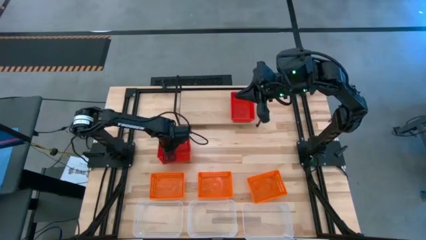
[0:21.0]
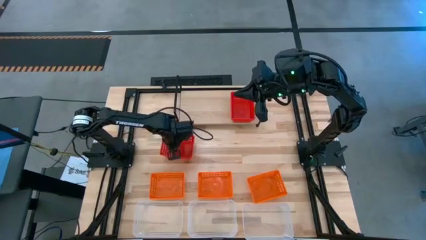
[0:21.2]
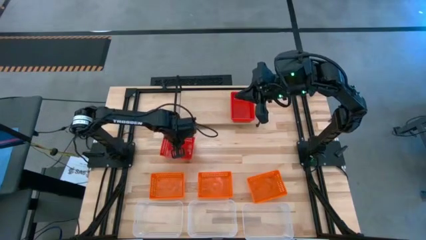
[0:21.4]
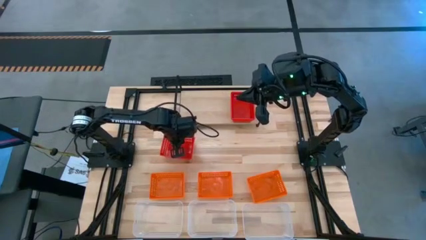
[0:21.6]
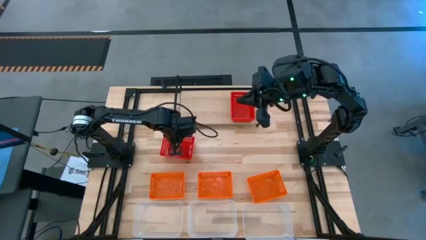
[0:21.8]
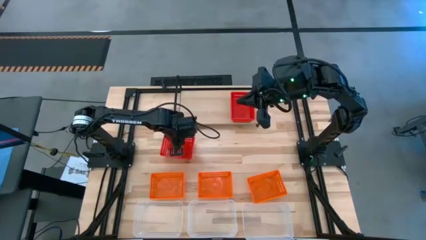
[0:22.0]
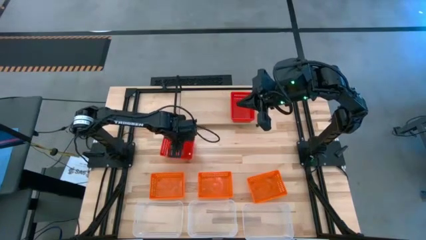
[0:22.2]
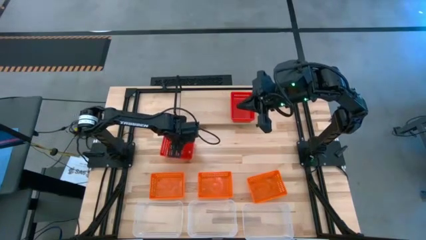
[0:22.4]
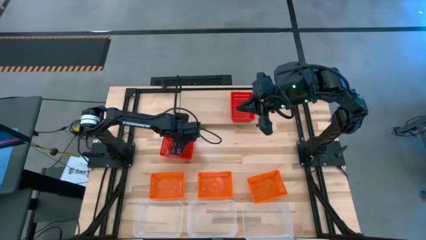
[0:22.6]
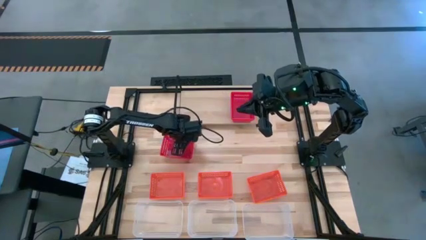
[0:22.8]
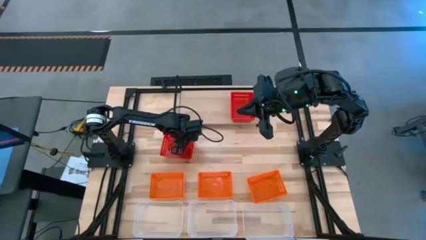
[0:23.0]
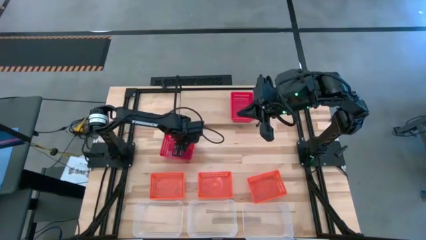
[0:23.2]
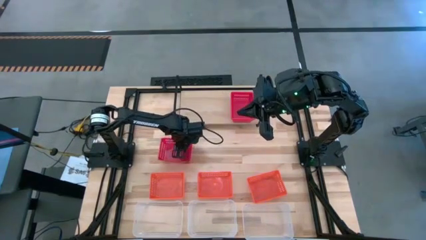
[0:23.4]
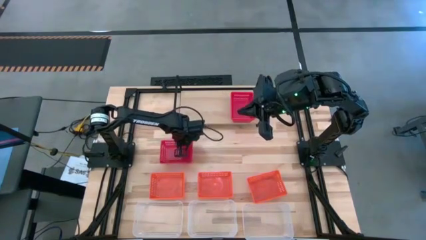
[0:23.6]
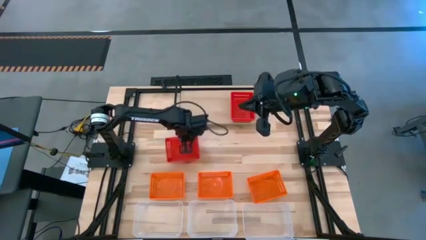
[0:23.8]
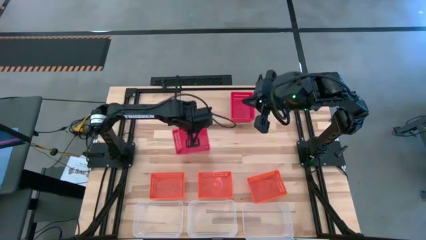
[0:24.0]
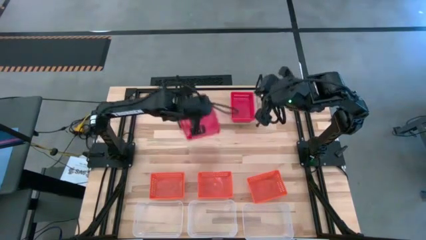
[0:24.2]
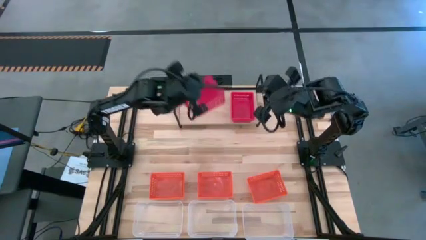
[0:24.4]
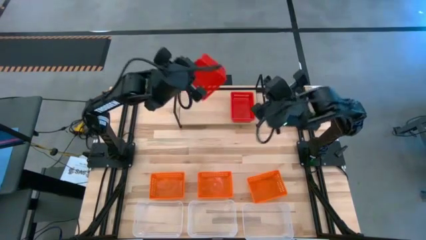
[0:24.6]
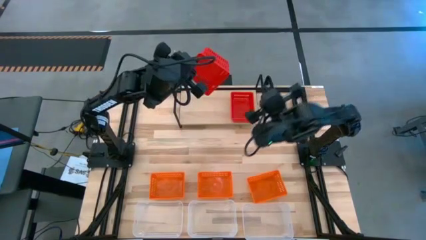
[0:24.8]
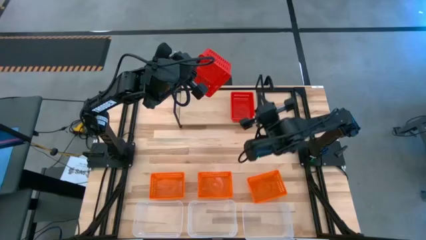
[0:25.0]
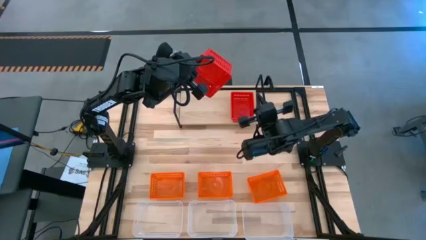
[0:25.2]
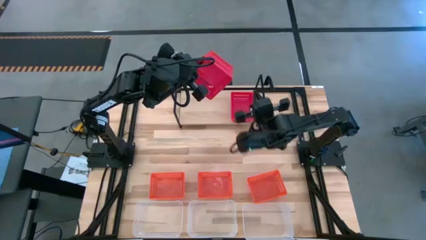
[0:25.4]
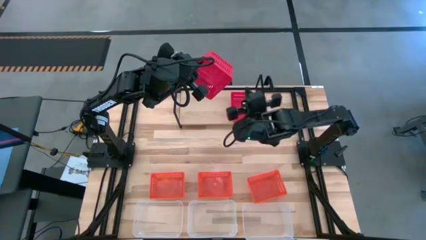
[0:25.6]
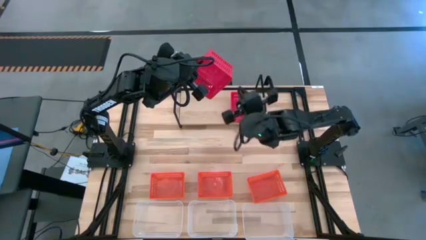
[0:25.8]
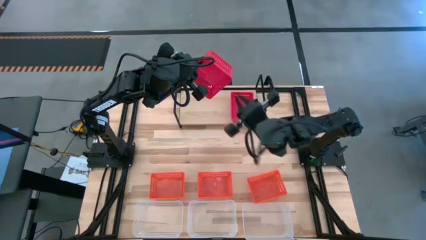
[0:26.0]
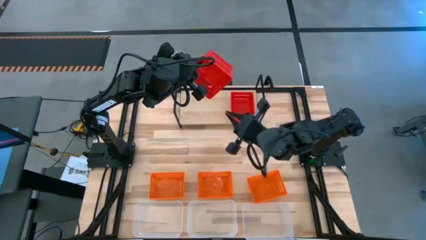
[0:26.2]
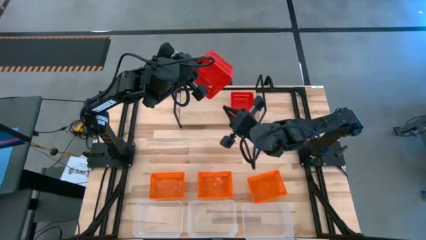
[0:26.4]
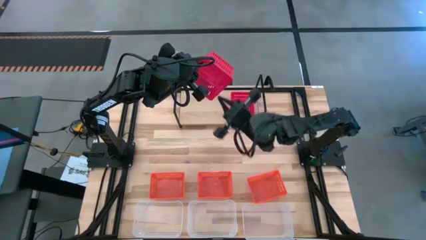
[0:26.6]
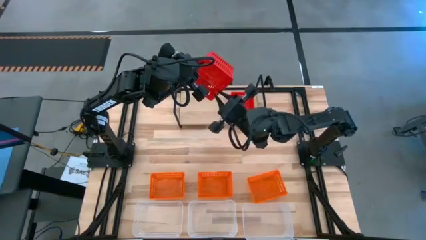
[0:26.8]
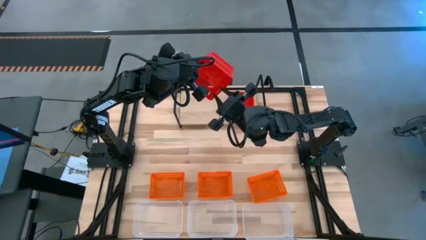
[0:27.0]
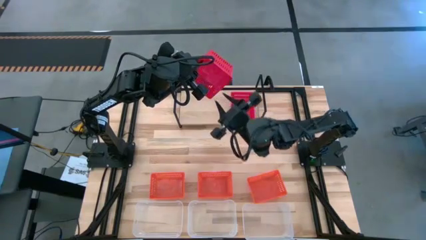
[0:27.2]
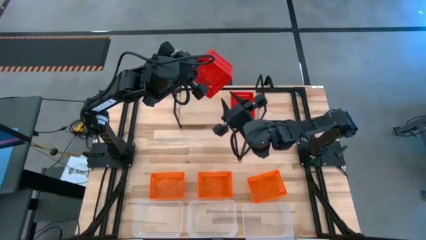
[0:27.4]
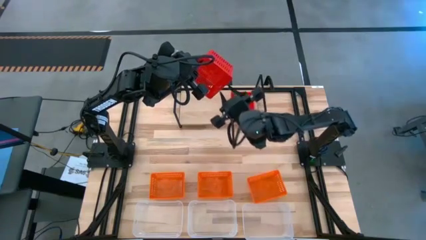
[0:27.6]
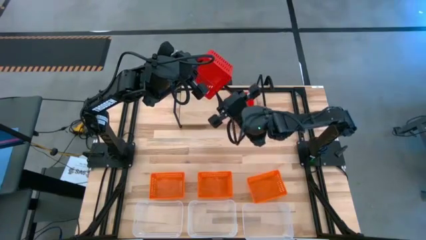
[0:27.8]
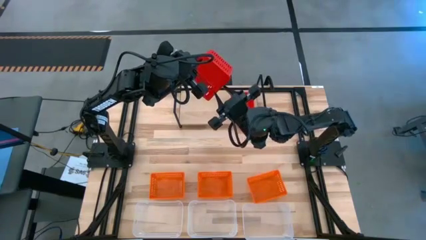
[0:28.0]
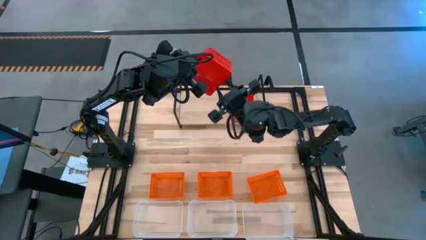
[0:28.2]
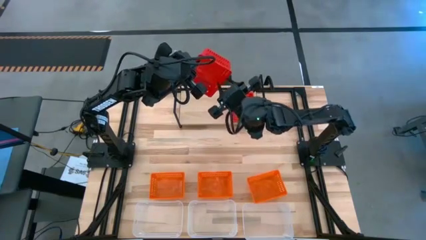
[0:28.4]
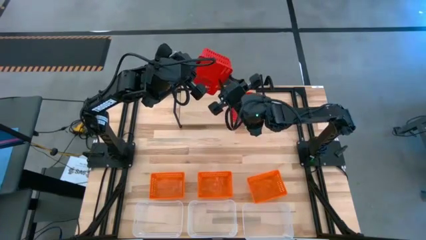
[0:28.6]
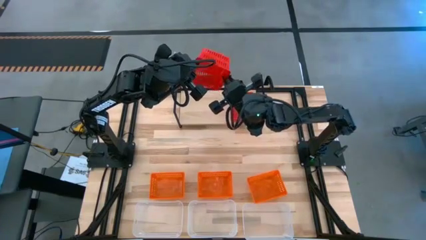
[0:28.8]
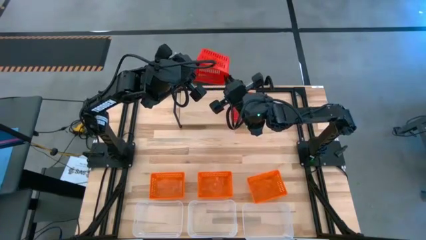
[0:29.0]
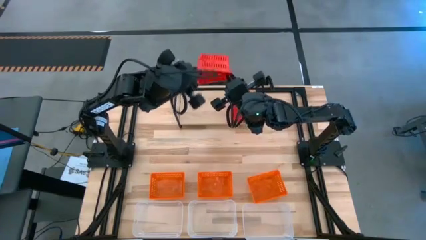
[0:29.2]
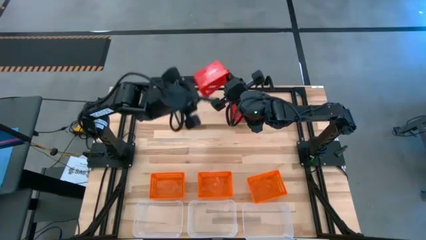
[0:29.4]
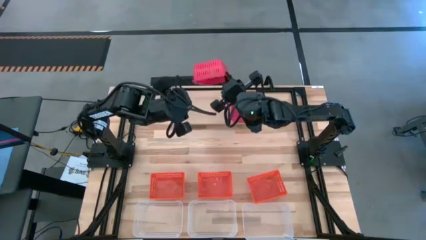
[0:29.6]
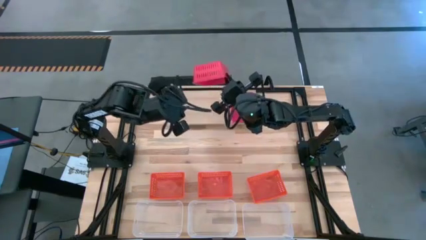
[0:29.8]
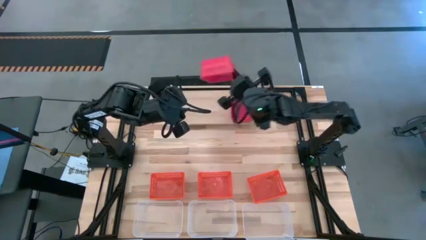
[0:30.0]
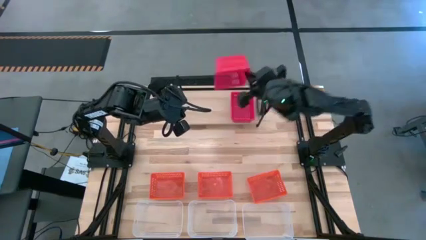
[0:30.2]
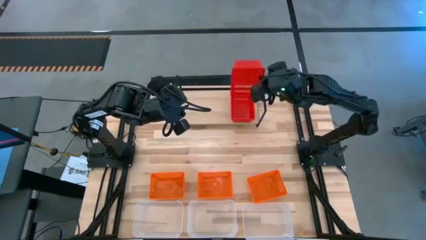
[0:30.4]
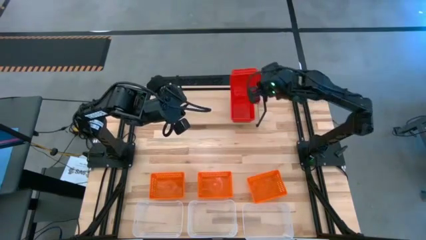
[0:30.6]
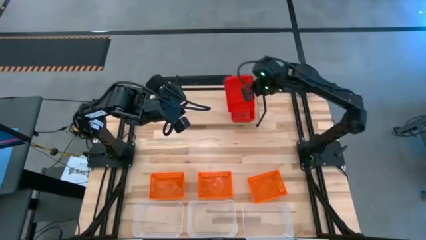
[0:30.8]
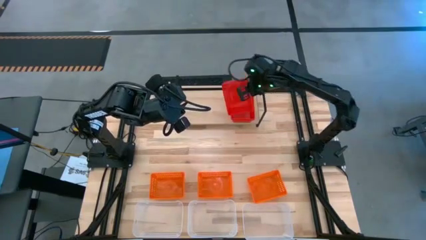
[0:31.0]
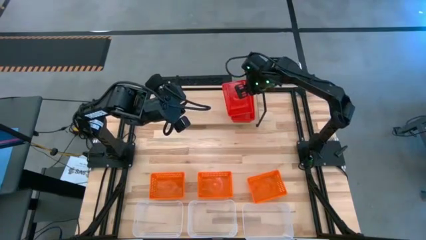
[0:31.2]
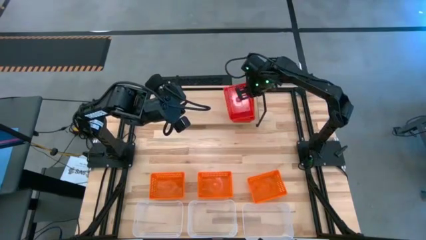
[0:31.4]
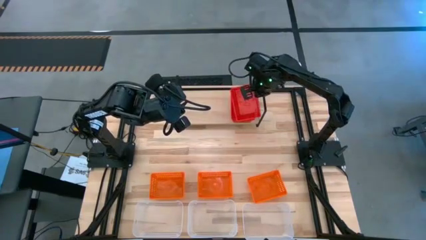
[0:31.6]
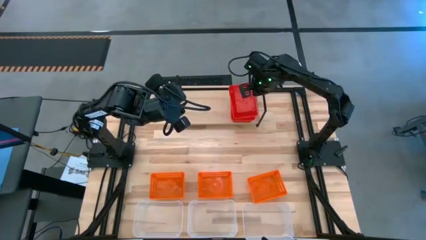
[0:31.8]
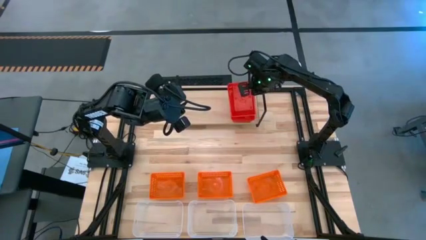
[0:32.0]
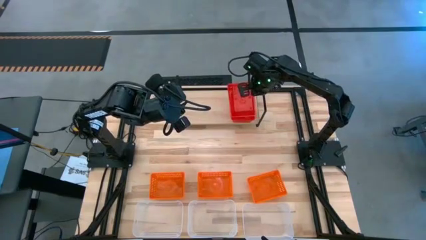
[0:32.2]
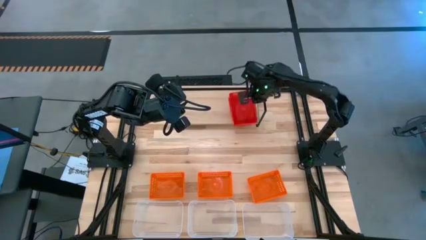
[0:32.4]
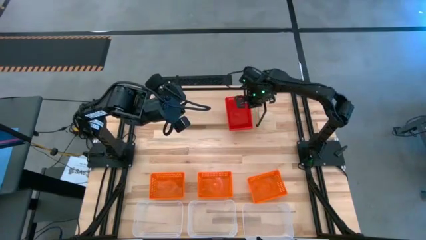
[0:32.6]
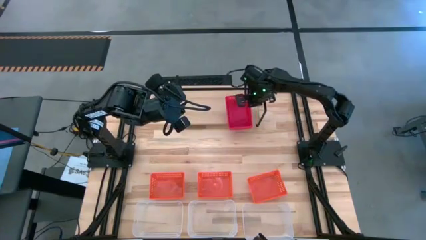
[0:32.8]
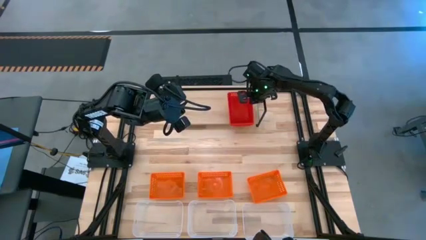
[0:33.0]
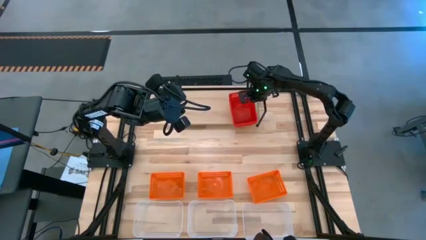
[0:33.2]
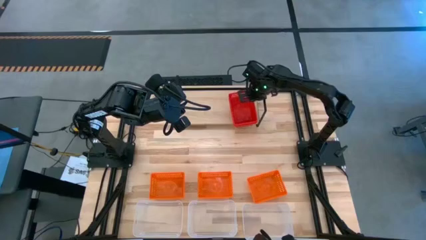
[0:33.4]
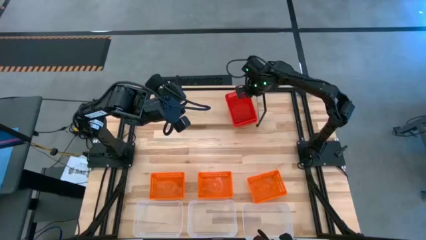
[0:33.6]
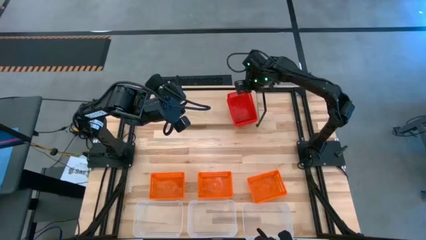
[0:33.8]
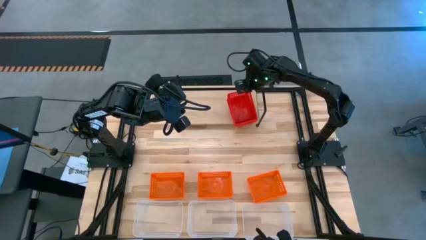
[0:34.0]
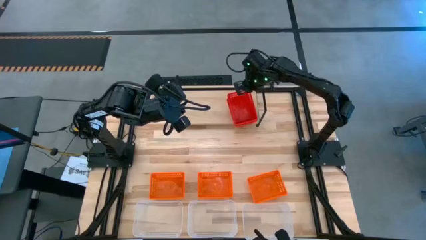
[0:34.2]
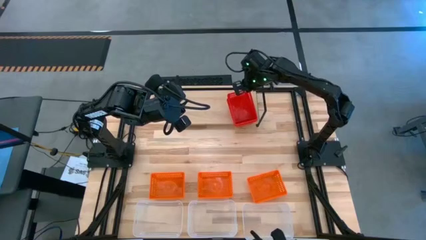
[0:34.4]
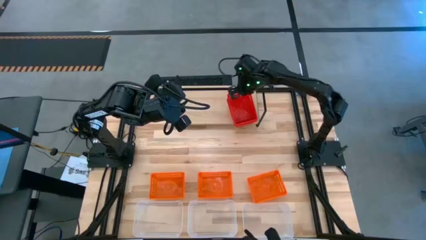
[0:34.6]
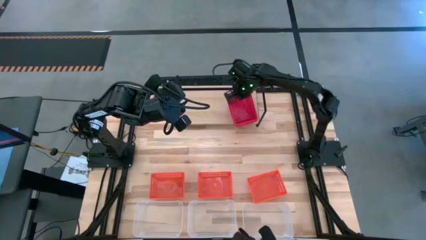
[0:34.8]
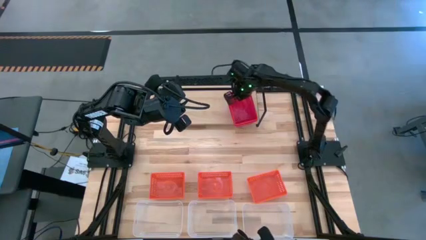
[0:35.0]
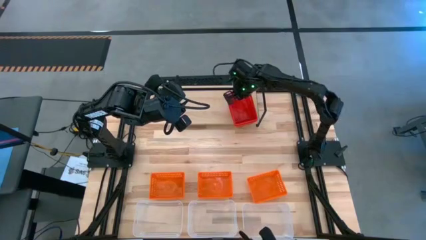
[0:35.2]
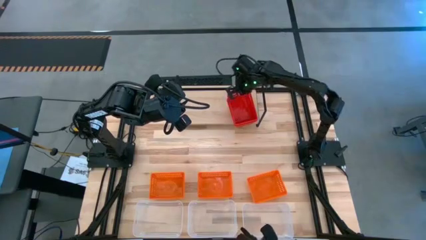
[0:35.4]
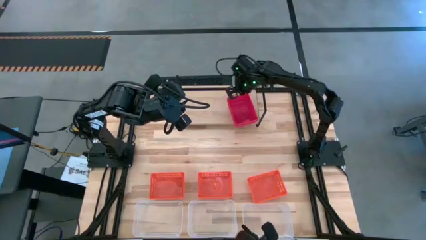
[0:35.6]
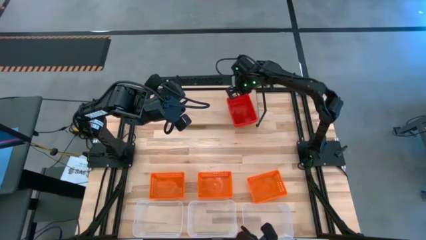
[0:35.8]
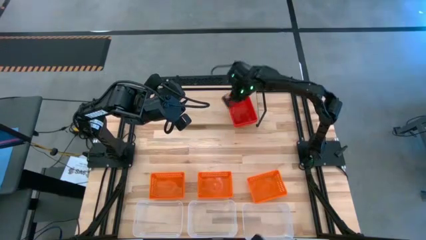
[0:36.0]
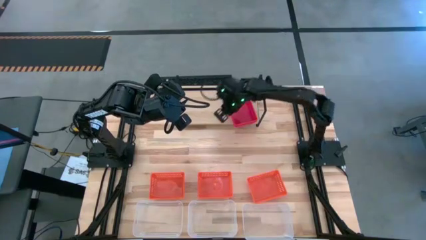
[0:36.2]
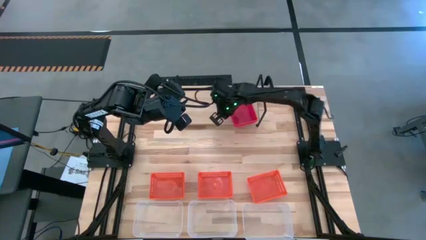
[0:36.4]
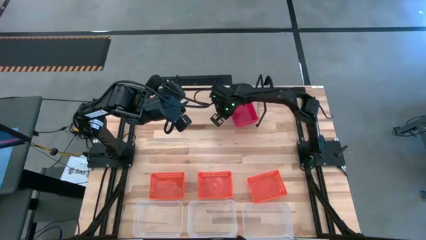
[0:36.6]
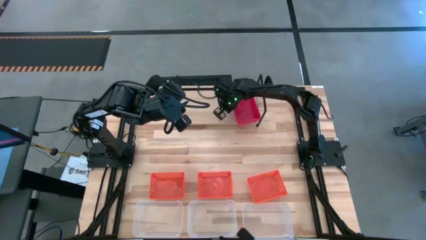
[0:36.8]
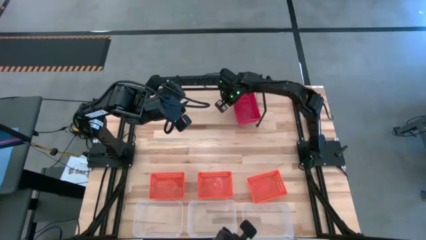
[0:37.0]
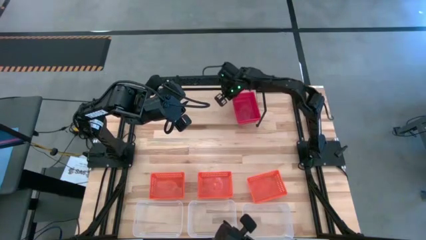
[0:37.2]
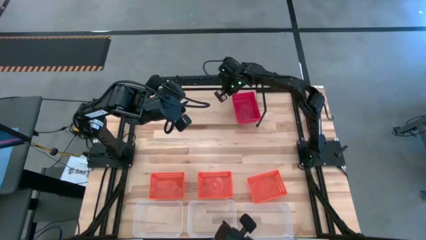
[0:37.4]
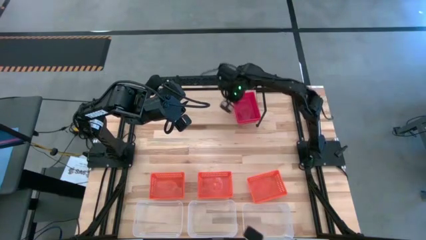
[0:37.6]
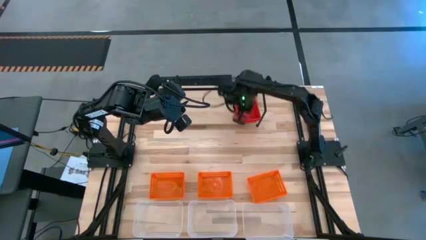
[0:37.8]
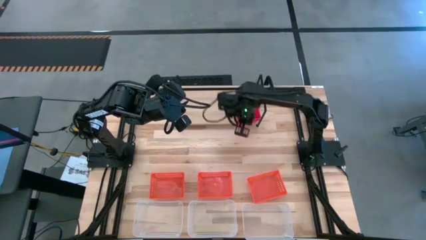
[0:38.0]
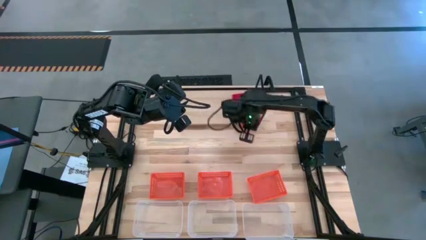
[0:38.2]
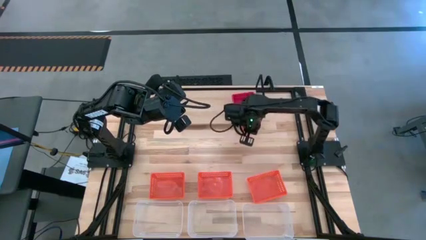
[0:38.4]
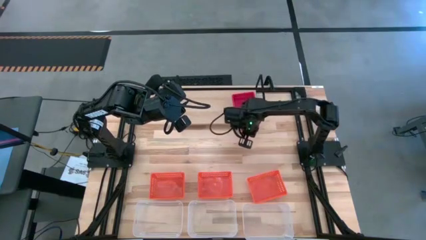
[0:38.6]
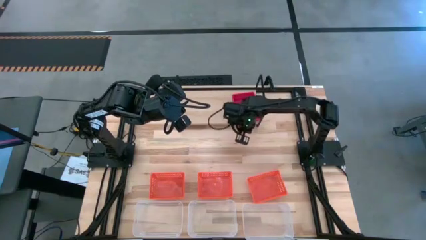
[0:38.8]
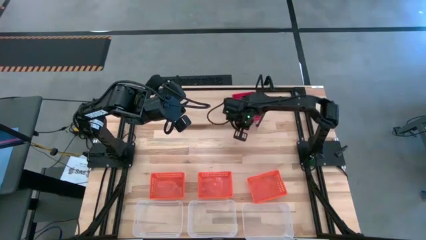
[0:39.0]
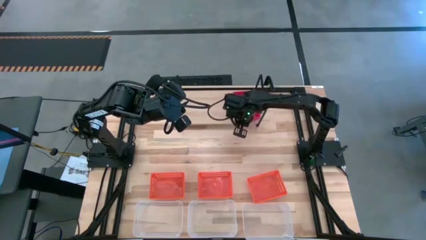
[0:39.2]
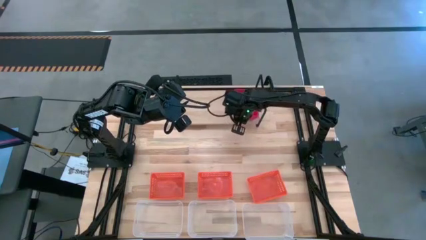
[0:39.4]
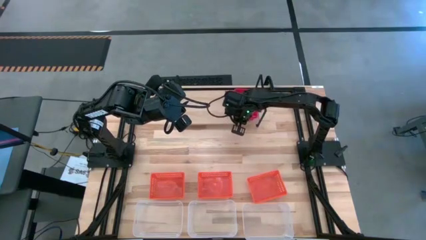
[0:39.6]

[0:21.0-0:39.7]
Task: Stack baskets on shelf by color
Stack the red bin on top of the red bins on the shelf
